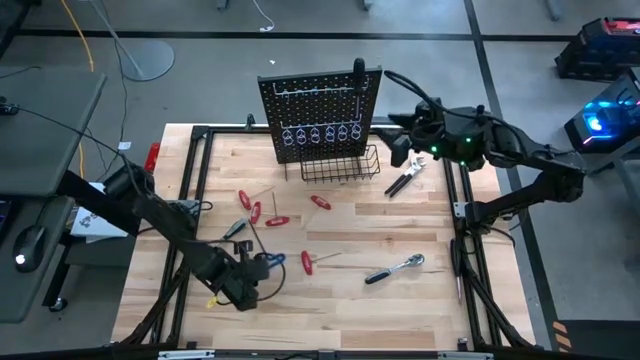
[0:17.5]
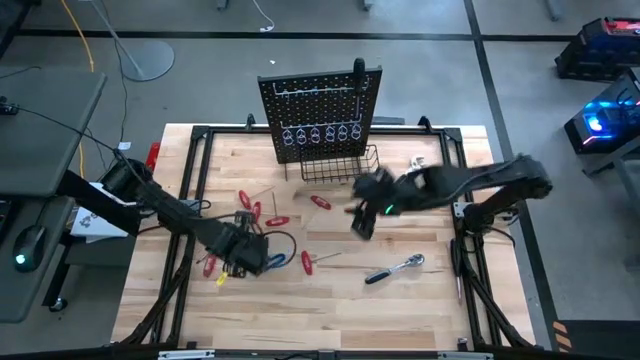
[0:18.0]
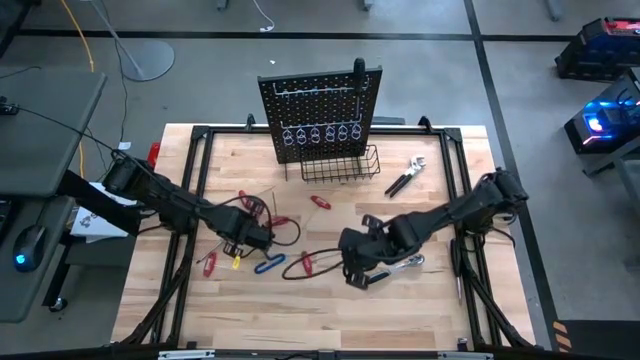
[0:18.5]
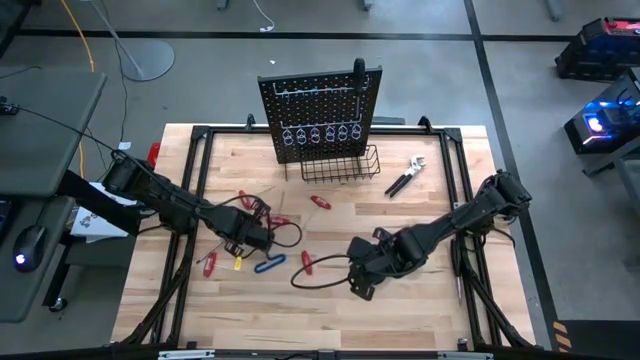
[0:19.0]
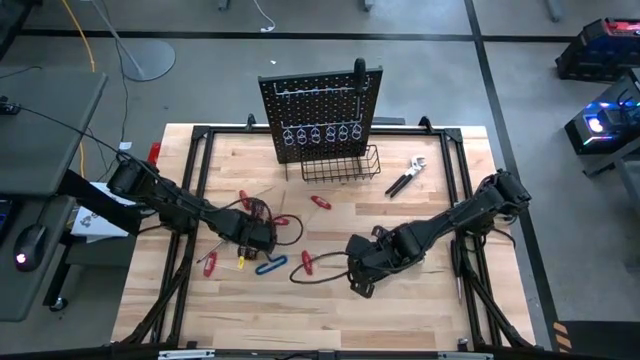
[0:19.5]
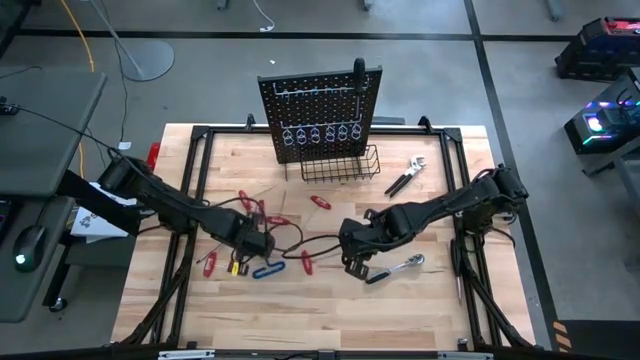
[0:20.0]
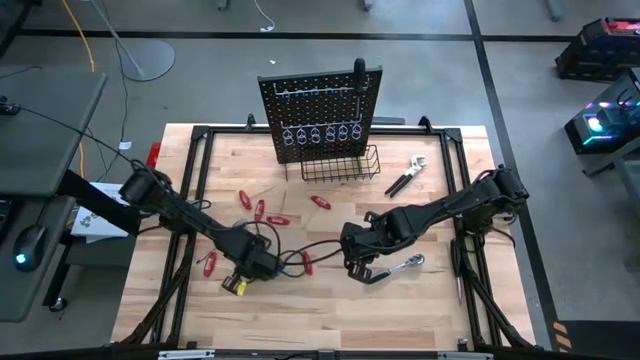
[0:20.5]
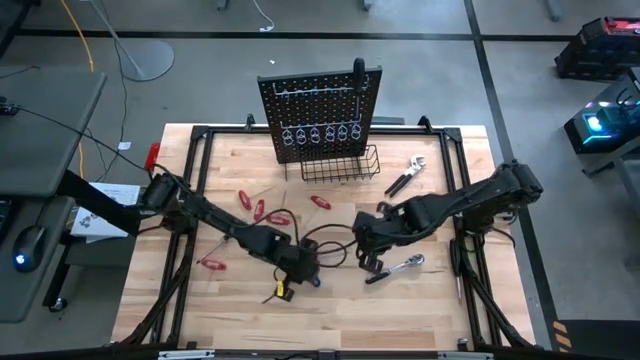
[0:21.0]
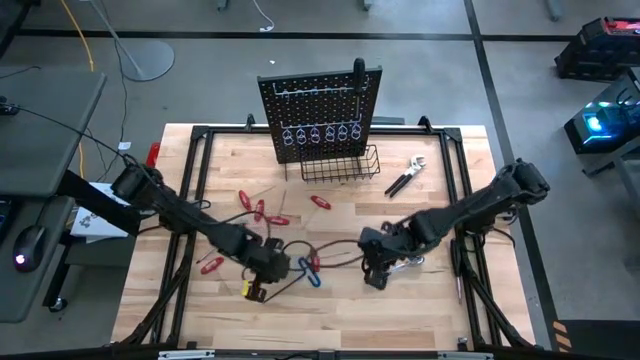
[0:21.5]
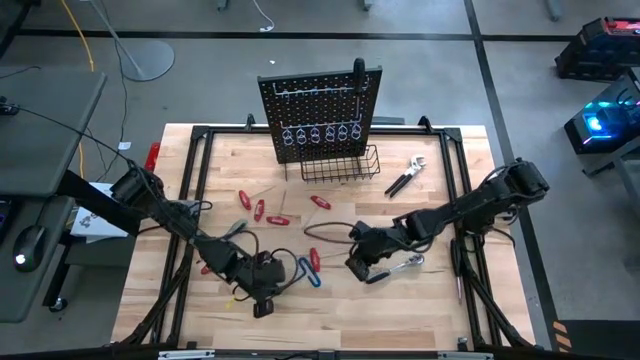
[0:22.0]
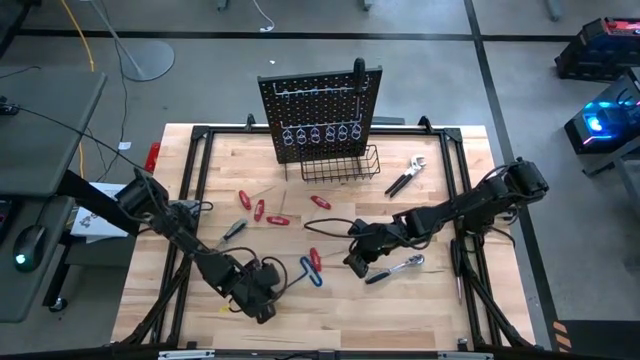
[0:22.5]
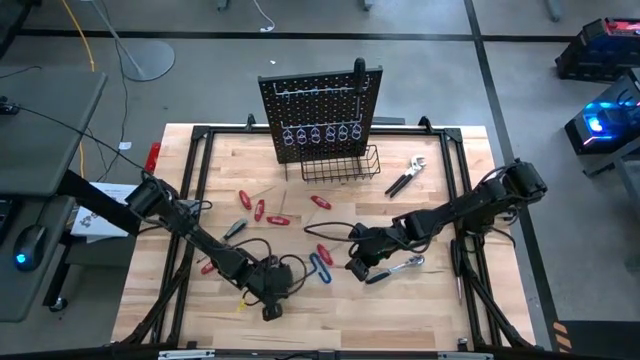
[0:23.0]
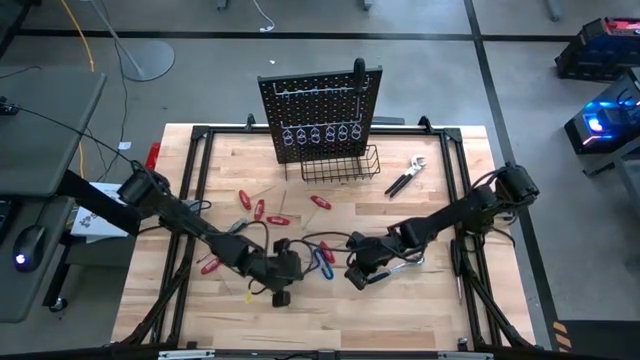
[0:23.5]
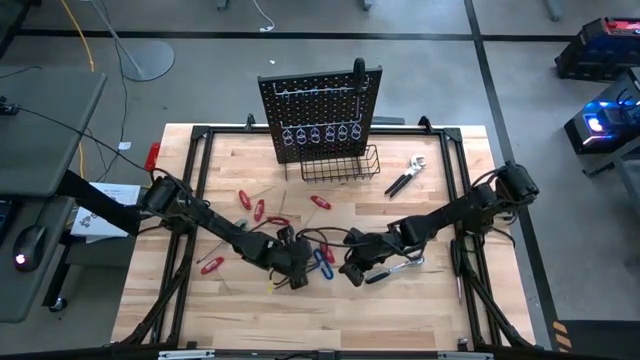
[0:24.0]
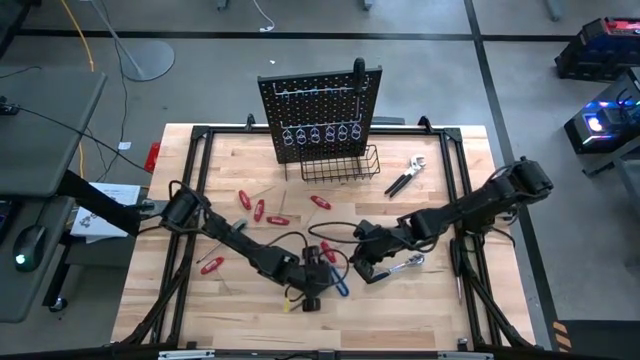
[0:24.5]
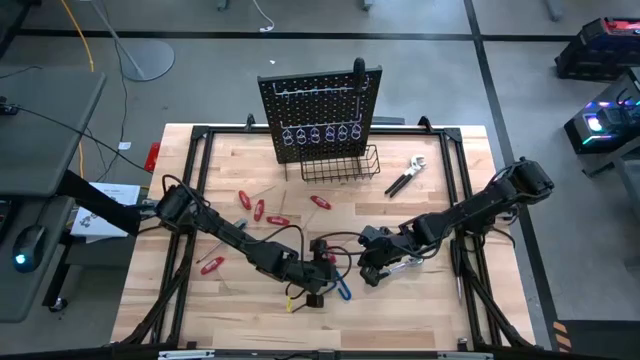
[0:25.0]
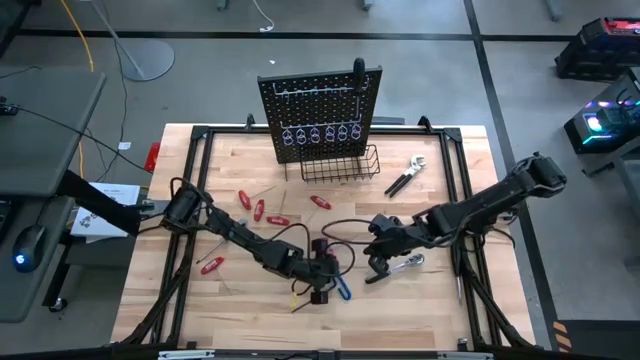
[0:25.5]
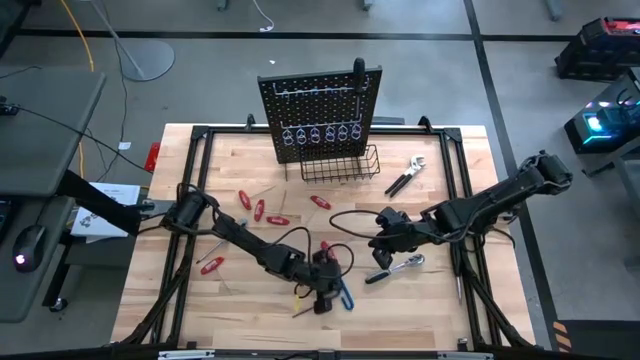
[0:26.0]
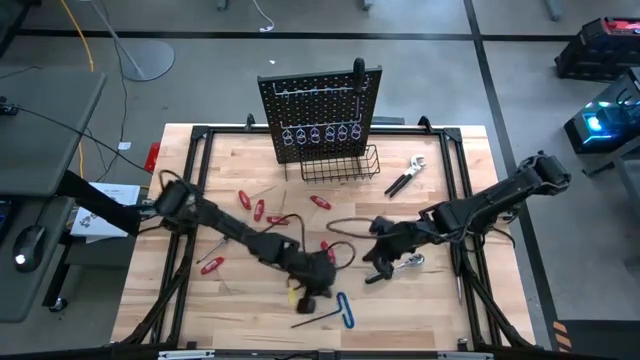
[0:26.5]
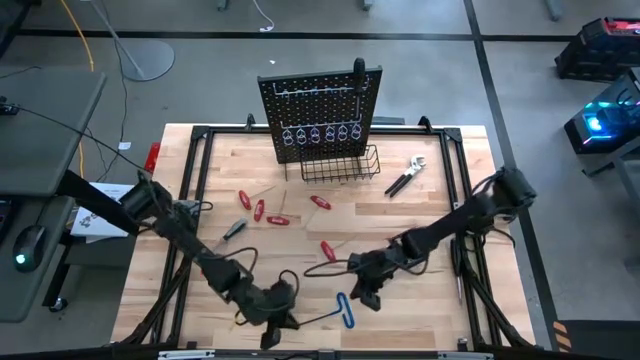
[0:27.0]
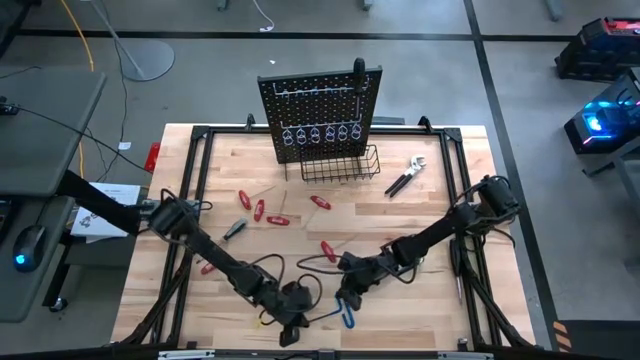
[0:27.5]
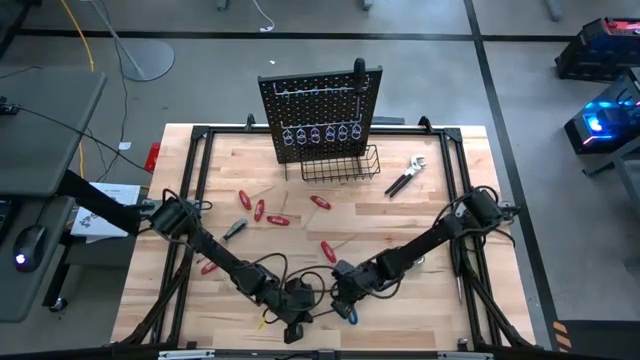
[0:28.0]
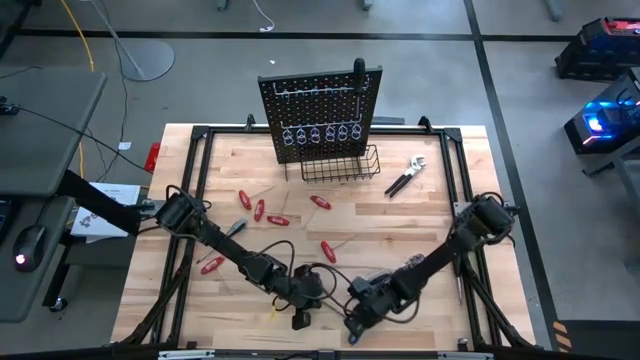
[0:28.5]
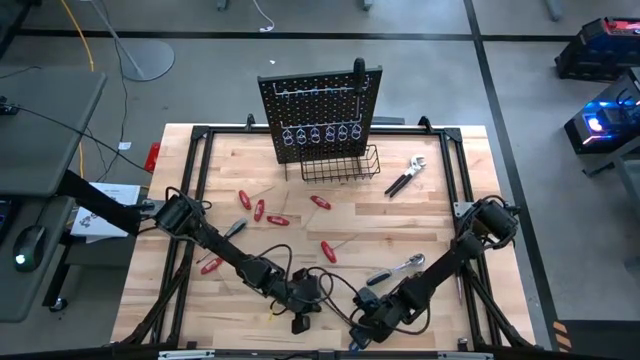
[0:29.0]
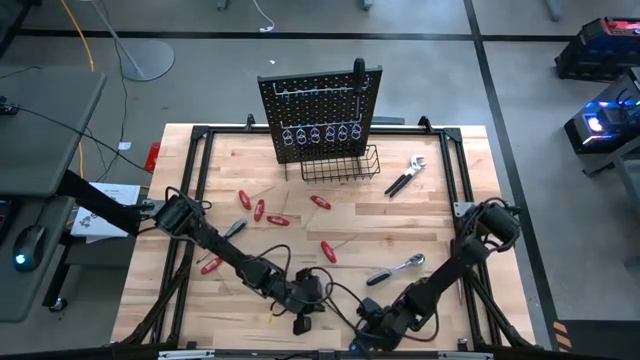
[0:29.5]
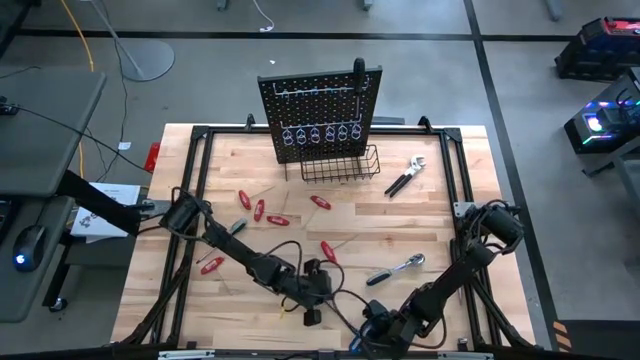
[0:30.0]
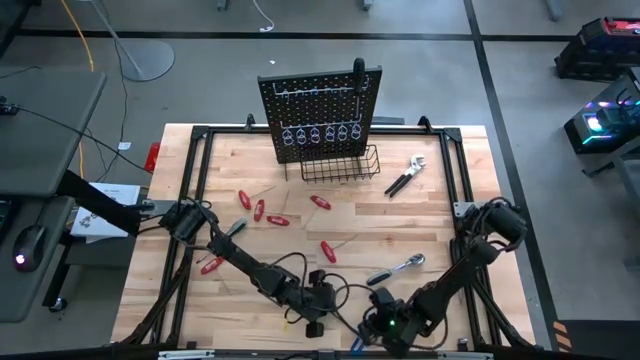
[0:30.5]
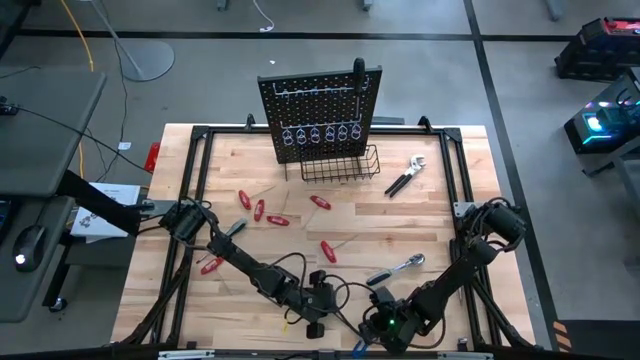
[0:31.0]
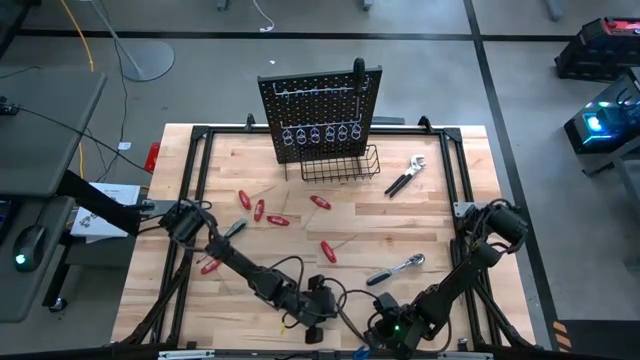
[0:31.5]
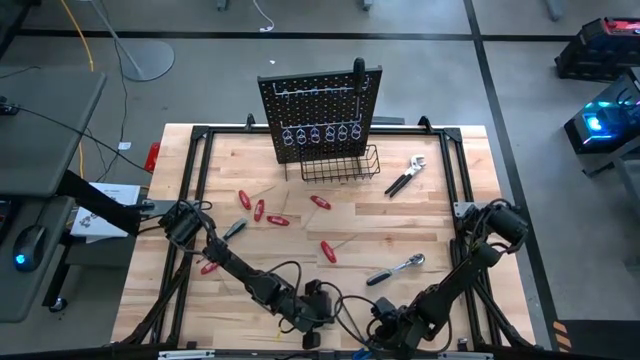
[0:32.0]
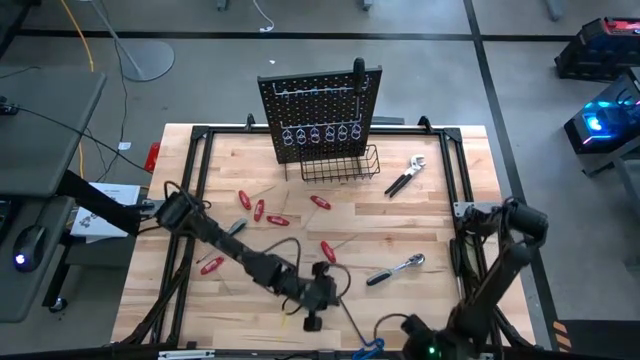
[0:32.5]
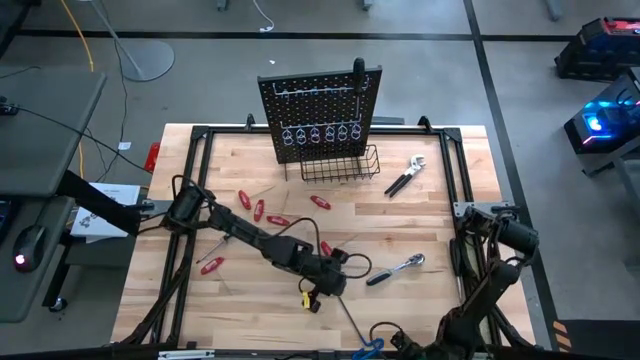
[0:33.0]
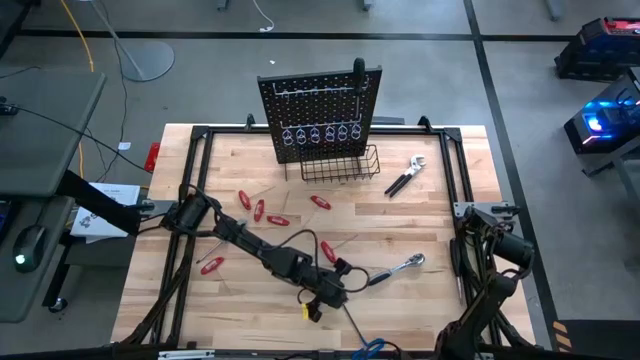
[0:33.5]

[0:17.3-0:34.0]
Task: Hang tools onto peg board
Hang the blue pick tool on the peg board

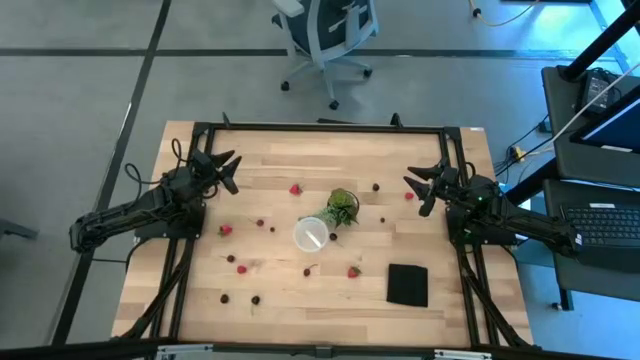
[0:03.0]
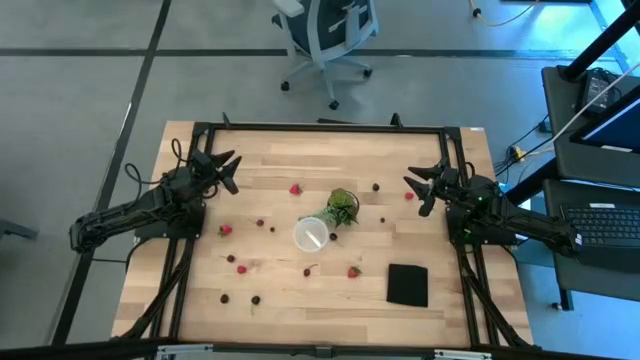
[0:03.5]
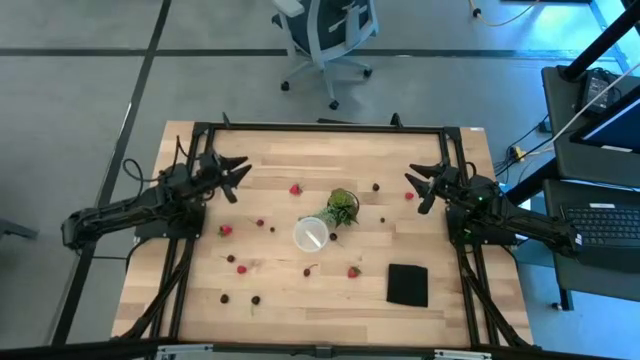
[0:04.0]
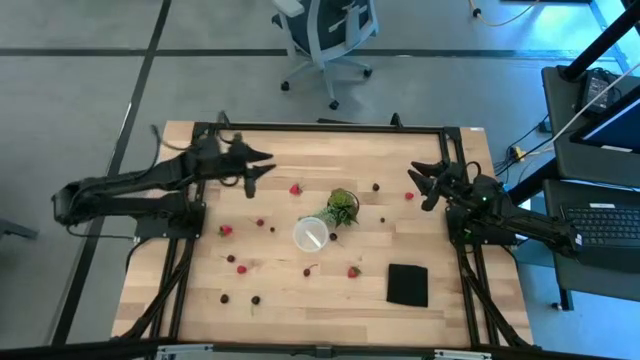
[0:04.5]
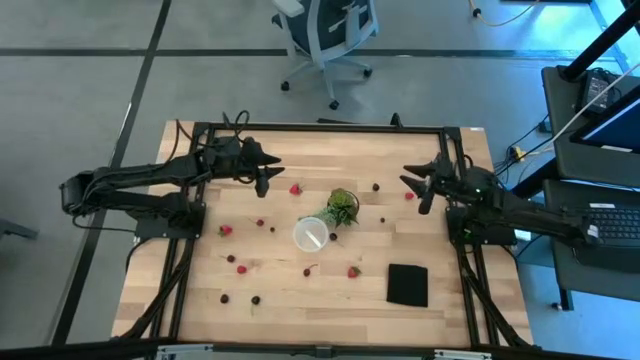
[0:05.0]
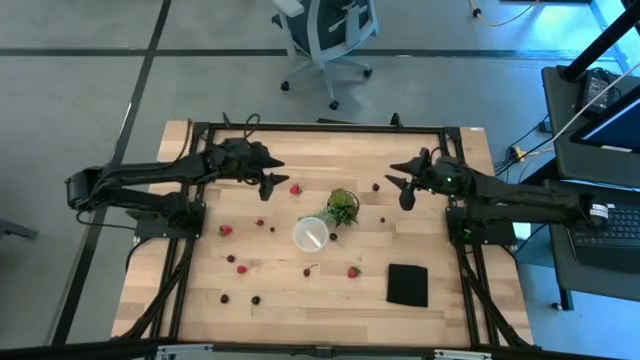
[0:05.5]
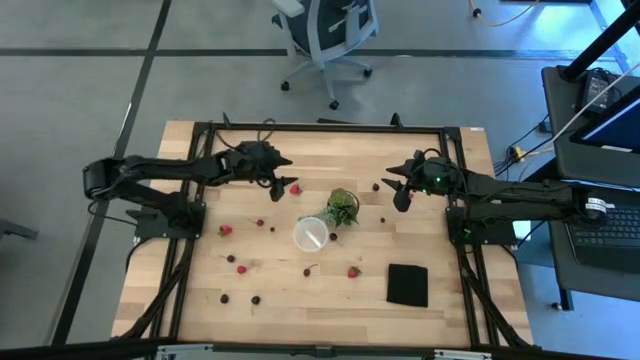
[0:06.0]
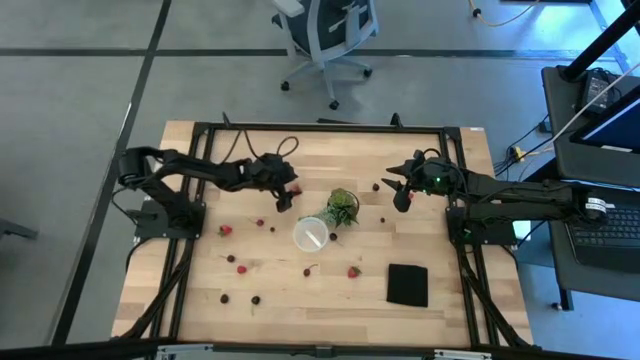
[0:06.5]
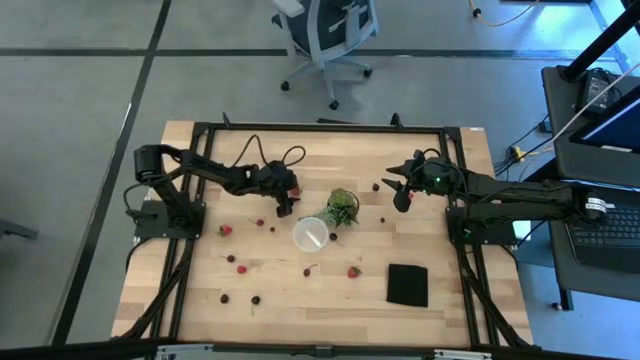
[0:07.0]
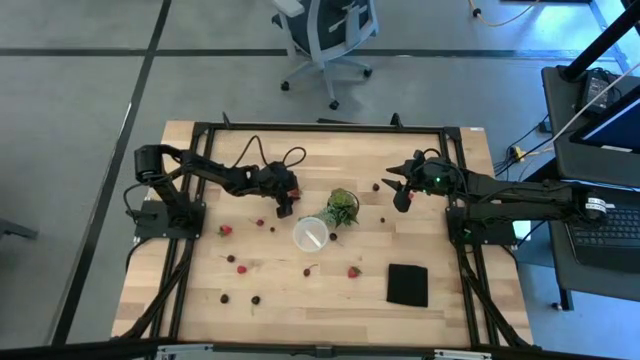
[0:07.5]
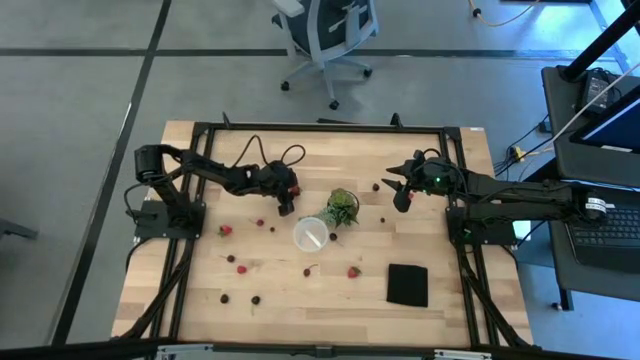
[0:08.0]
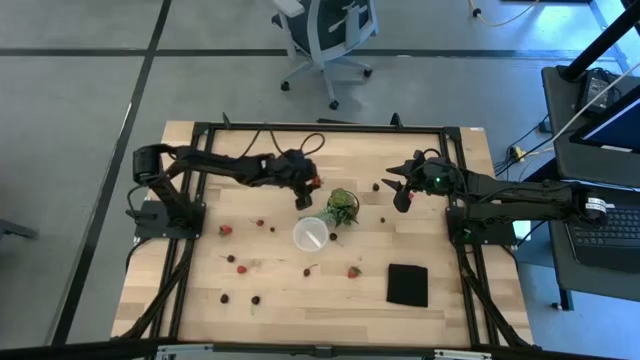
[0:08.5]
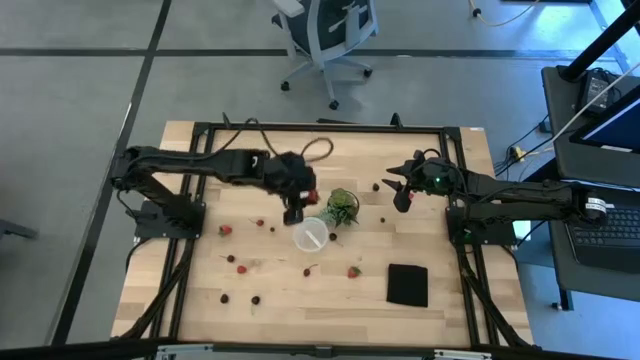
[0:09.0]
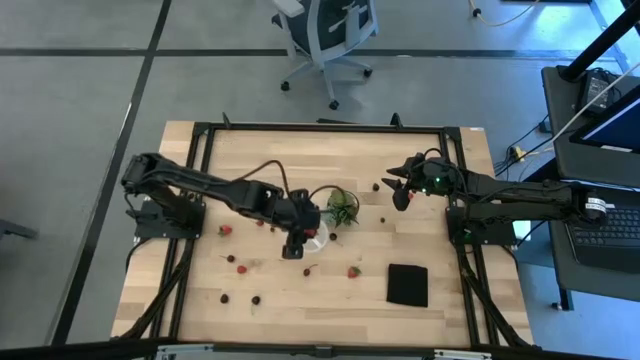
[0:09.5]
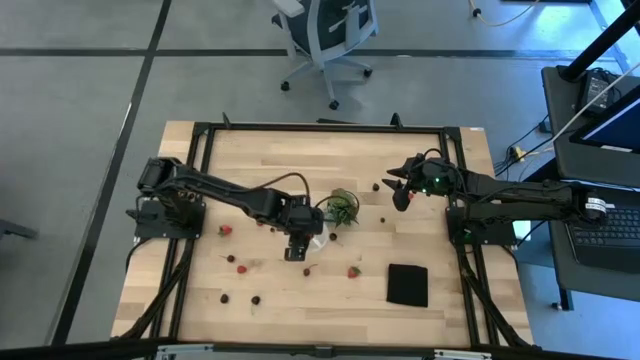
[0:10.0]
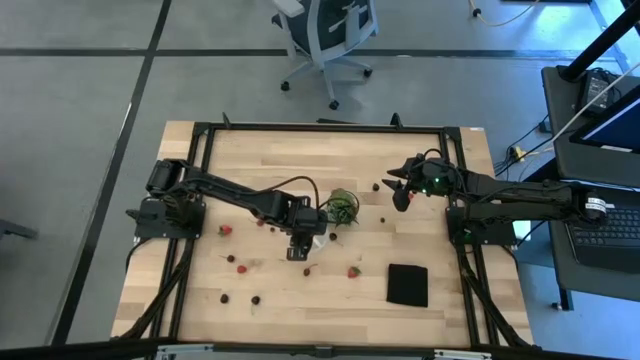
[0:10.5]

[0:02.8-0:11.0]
Task: Pick and placing Produce into tupperware
Put the top strawberry into the transparent container
